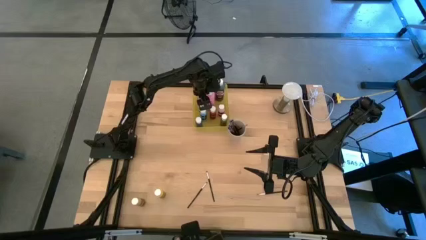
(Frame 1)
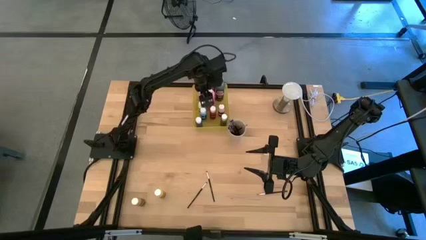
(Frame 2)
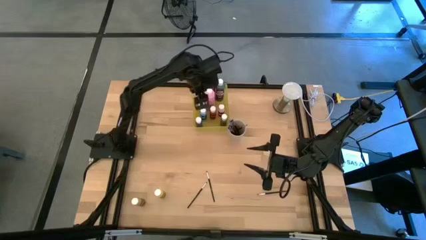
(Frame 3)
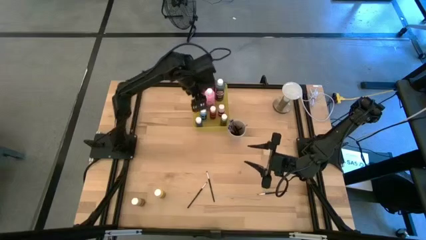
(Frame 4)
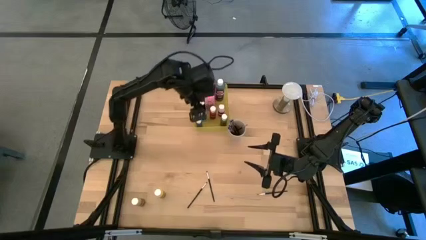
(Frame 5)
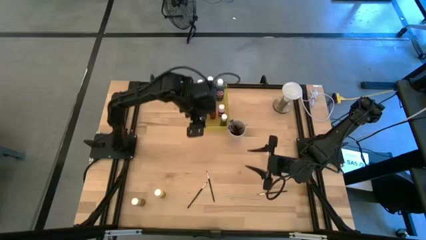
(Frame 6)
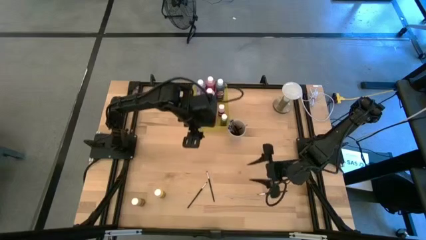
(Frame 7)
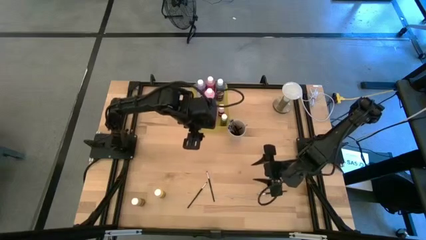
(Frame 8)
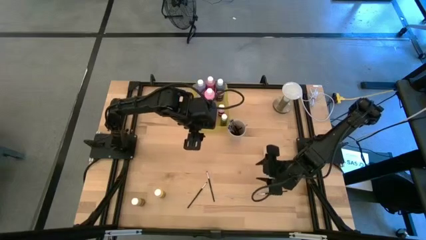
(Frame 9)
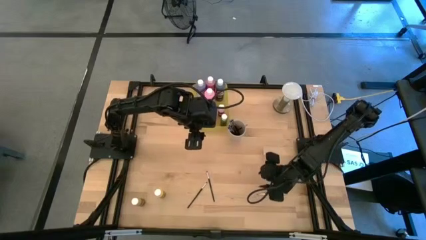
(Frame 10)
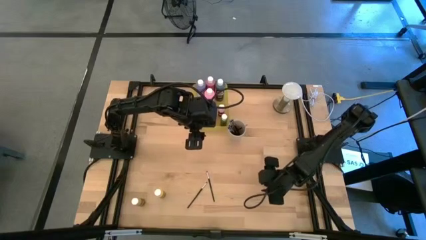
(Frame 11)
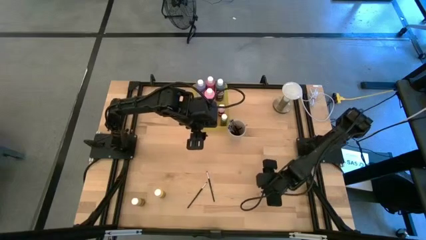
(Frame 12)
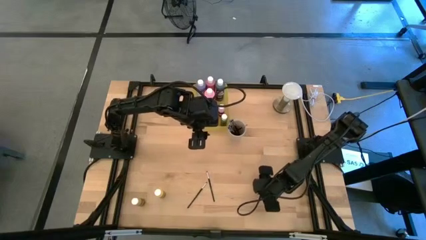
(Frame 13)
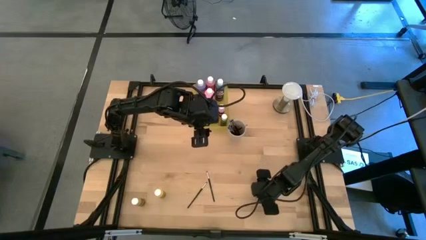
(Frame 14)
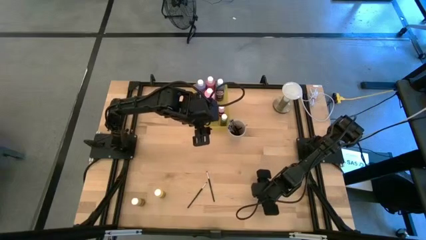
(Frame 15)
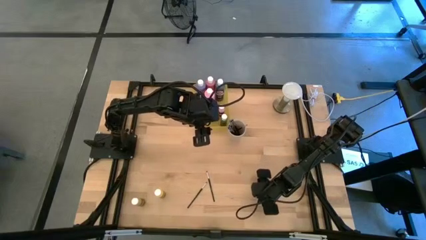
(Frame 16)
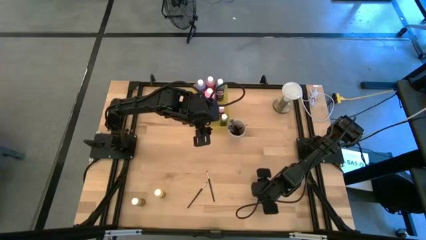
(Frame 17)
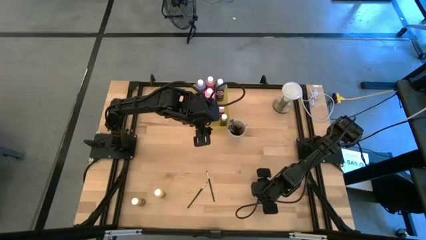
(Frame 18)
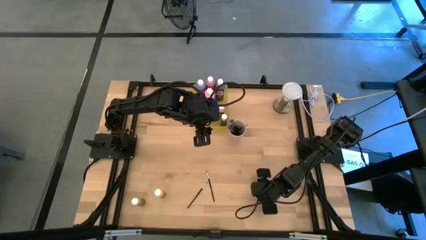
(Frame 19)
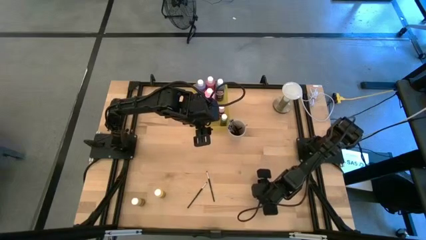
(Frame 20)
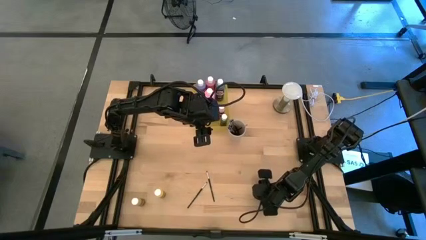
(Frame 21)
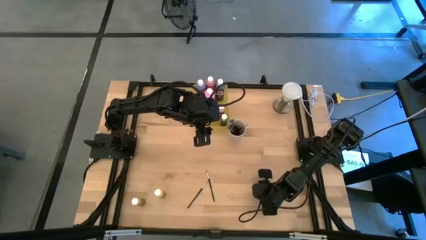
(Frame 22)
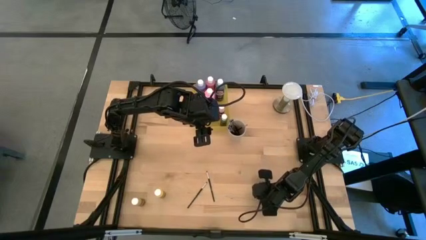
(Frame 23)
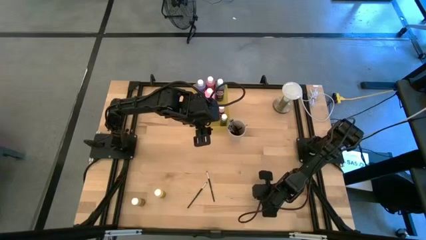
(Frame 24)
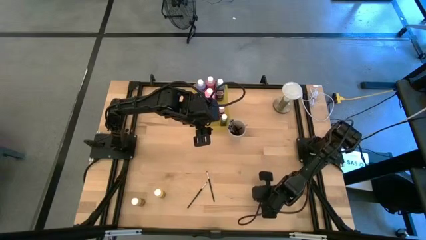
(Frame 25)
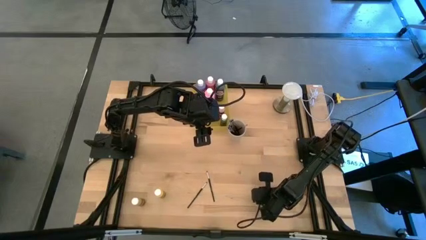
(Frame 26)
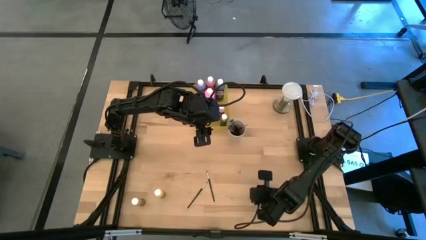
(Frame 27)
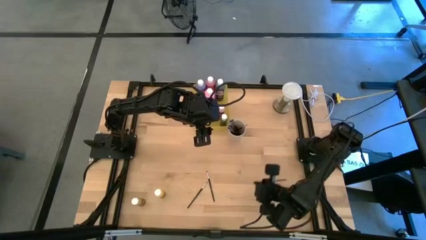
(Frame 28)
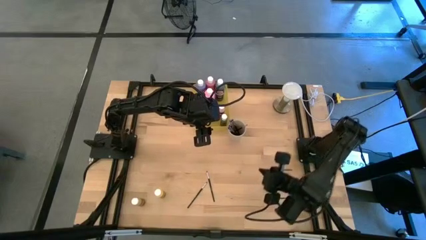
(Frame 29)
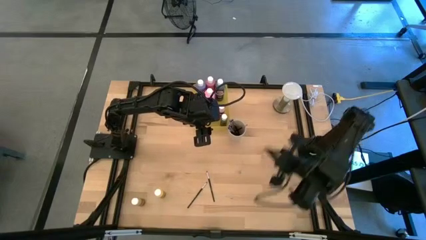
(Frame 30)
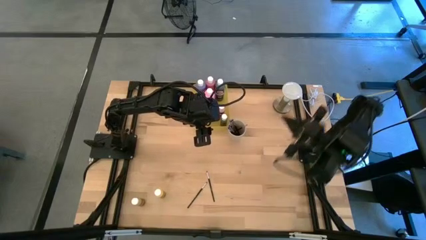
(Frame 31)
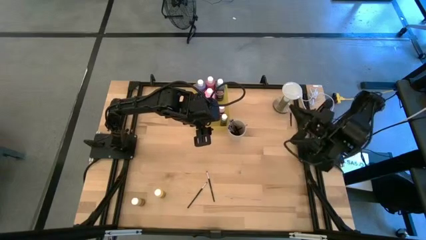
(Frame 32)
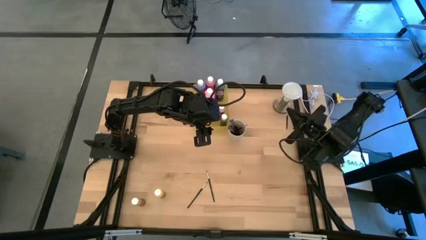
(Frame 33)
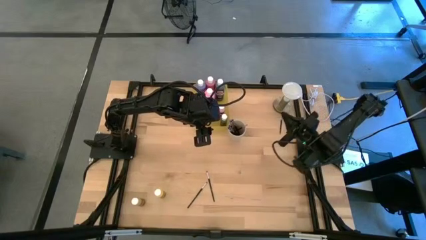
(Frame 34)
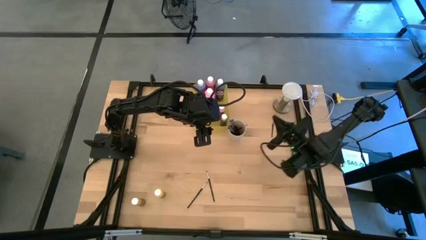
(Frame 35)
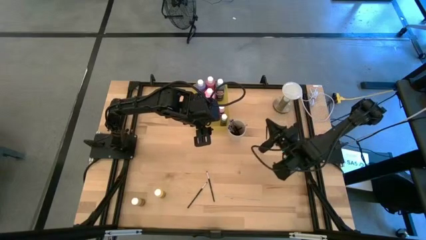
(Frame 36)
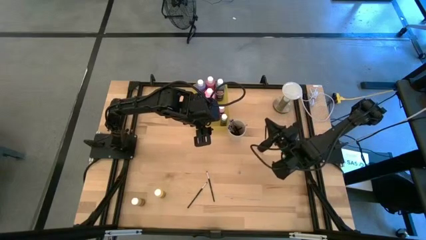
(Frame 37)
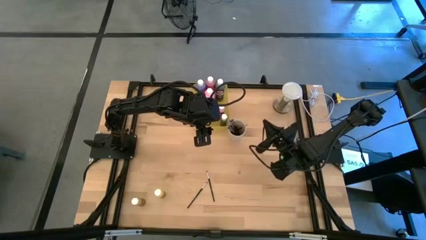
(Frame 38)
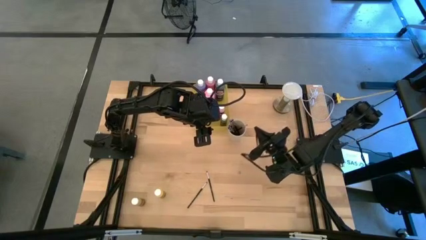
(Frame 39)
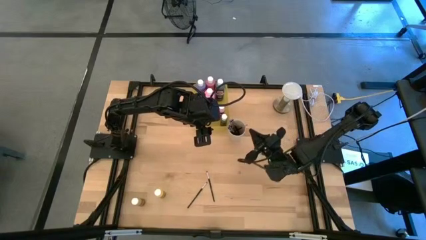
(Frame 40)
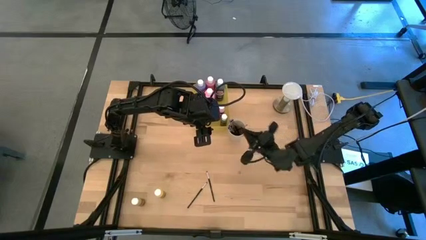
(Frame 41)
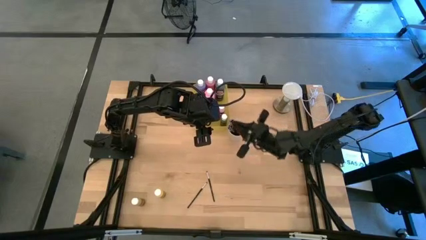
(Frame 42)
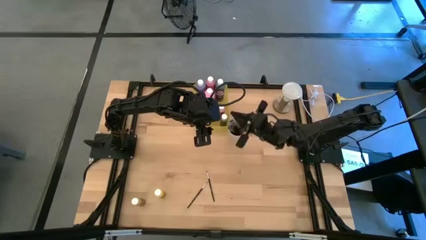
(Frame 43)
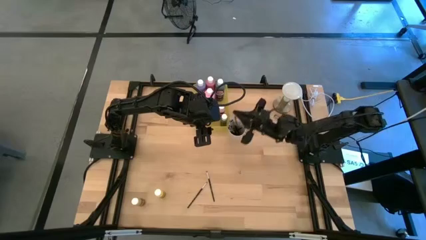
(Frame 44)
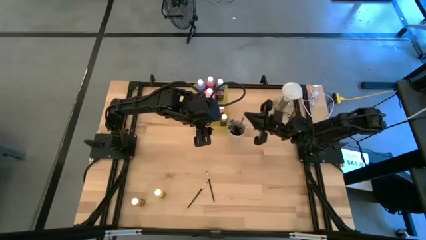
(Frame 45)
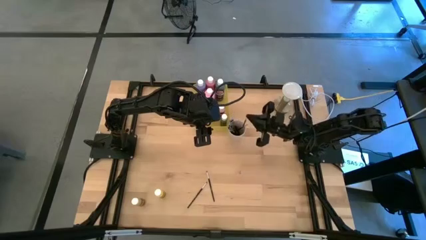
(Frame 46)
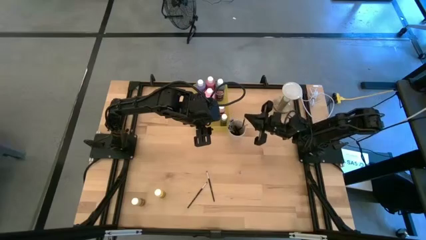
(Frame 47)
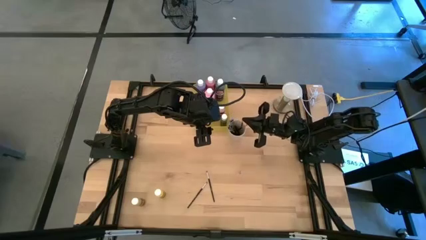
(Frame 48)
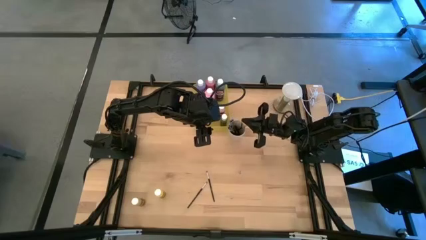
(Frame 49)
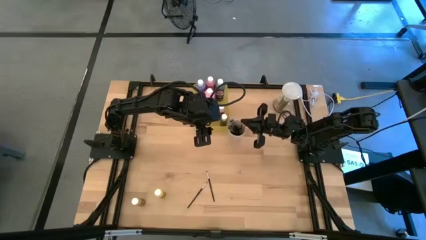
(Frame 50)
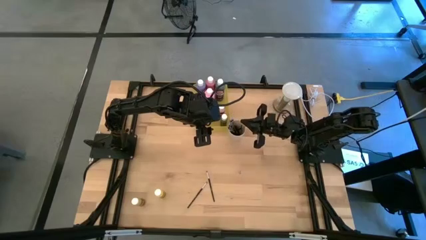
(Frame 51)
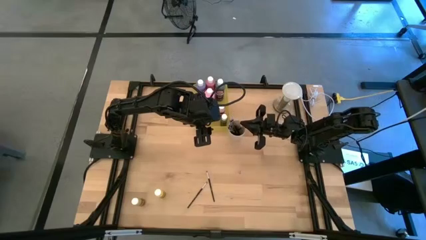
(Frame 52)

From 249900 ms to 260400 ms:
Task: Pick & Place Paint Supplies
Put the black paintbrush into the white cup

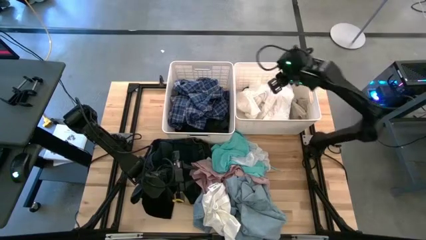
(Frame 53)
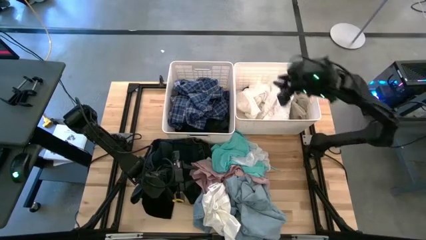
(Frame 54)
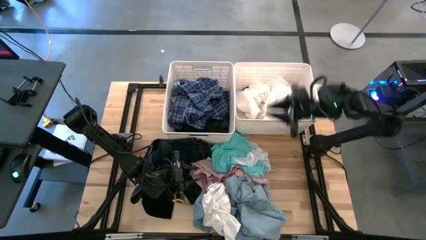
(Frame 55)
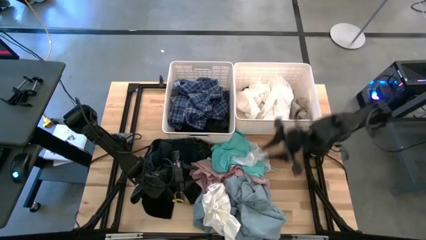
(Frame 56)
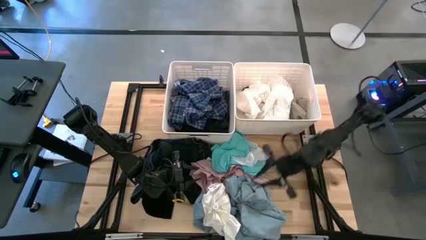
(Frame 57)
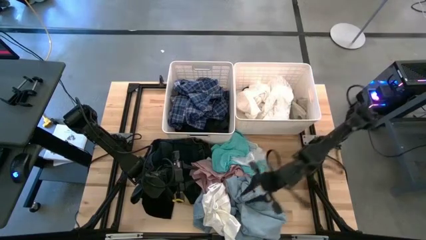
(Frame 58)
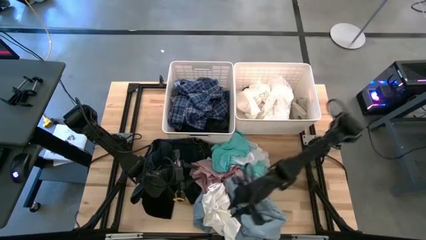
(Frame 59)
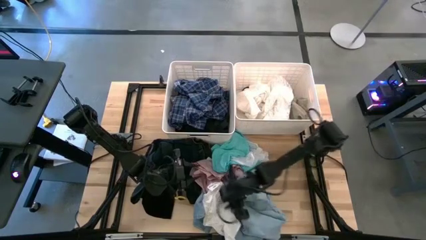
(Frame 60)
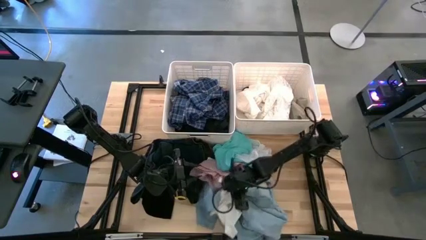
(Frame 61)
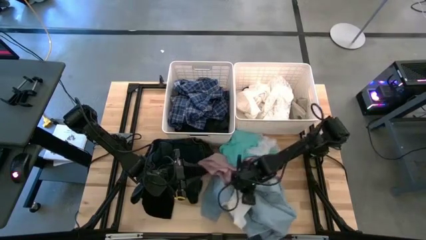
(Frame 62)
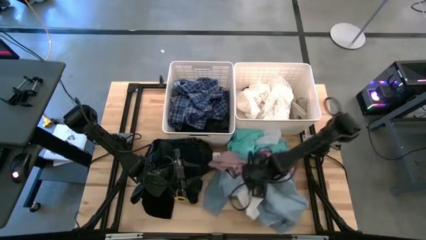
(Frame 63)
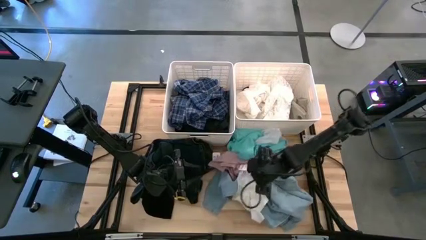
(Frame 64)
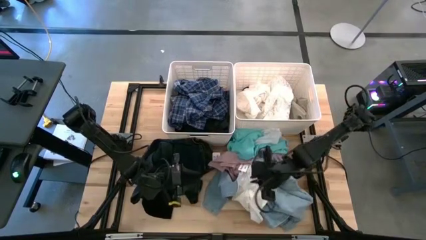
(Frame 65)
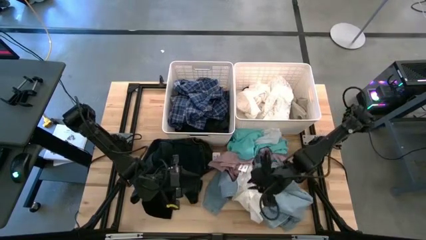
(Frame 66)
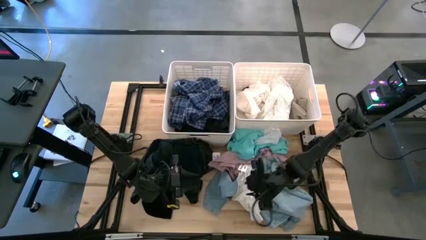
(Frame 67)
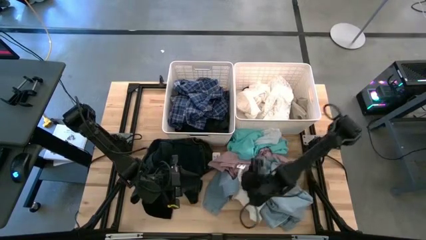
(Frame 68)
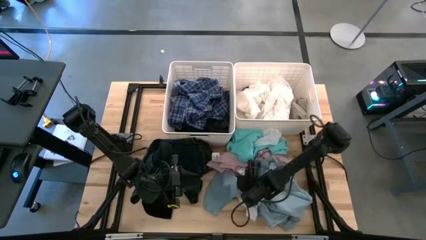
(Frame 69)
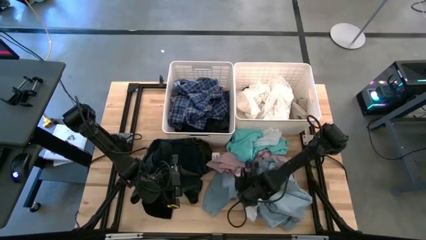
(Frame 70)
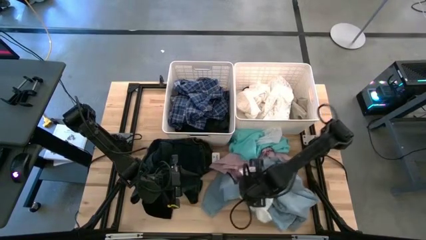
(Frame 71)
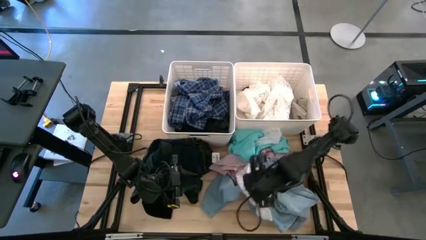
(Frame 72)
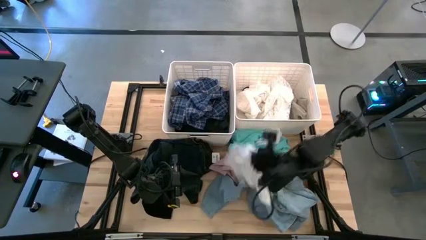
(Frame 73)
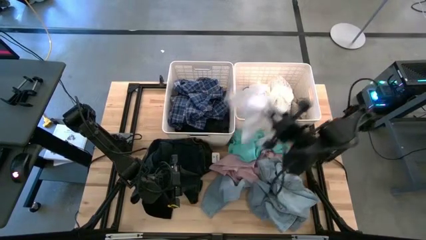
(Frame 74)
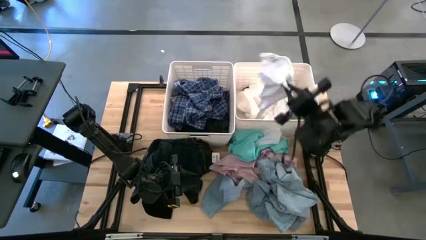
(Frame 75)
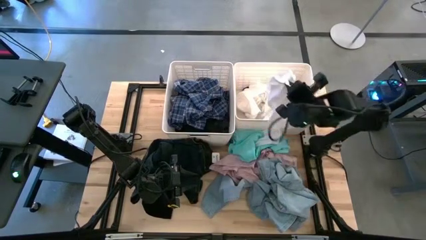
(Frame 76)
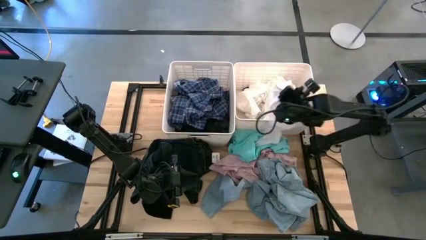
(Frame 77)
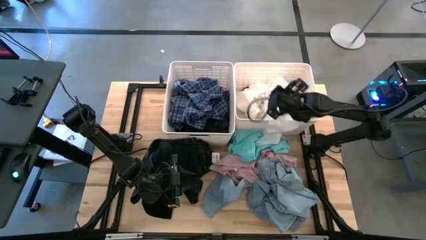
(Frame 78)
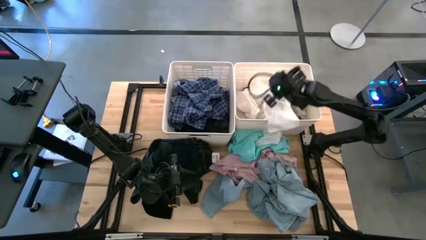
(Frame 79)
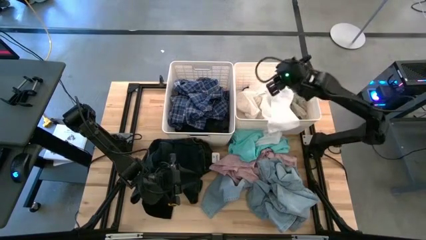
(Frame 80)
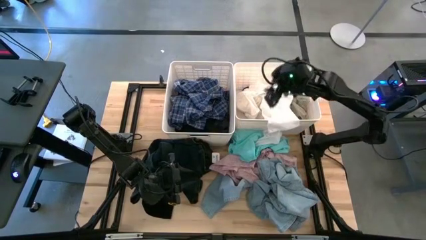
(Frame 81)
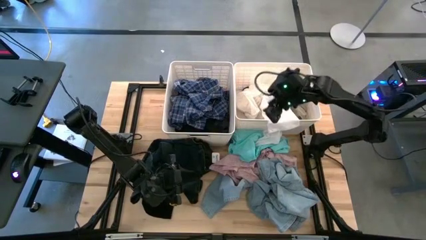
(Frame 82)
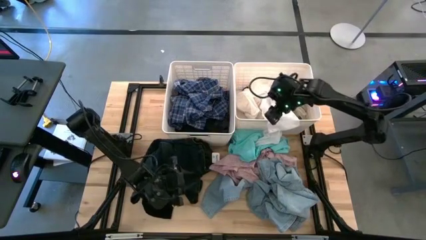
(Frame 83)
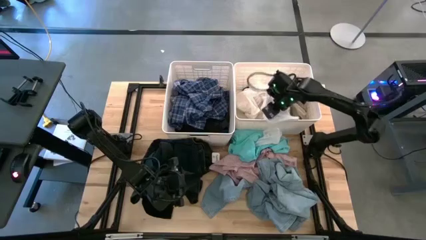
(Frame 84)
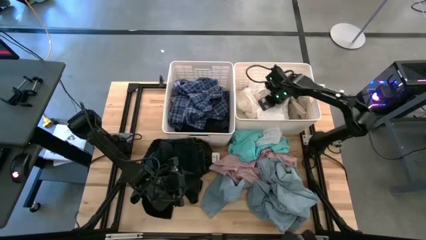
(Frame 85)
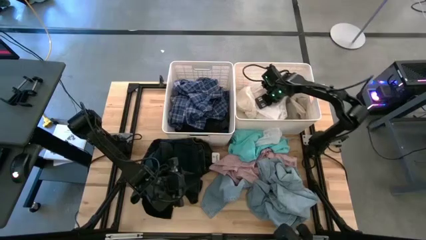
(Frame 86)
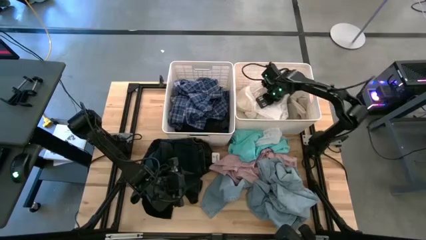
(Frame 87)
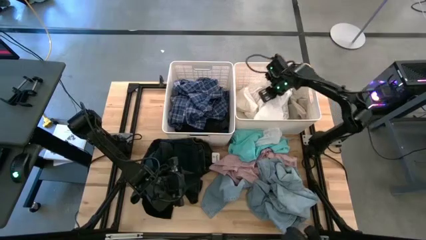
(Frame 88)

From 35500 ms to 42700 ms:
Task: Sort clothes
Put the white shirts into the right white bin
